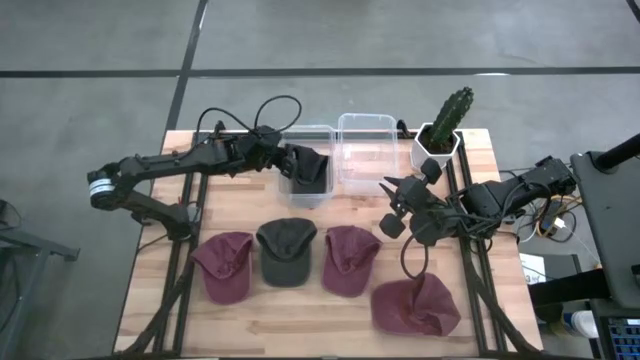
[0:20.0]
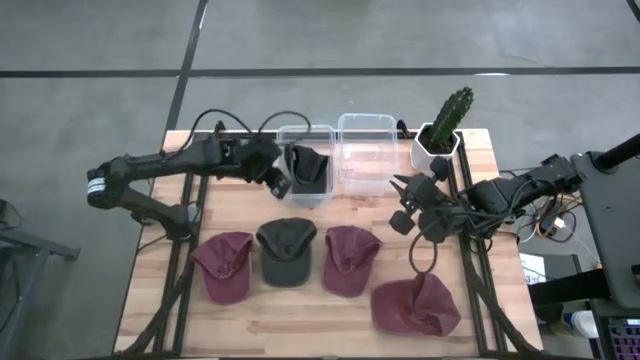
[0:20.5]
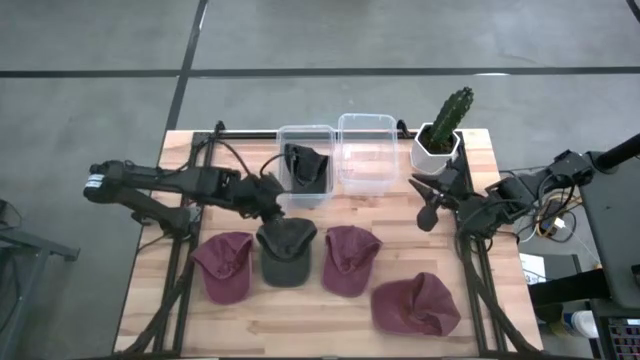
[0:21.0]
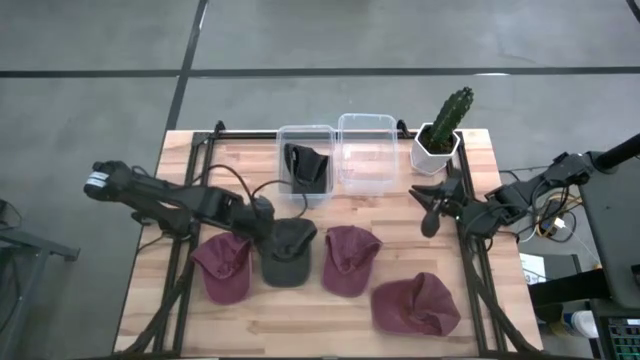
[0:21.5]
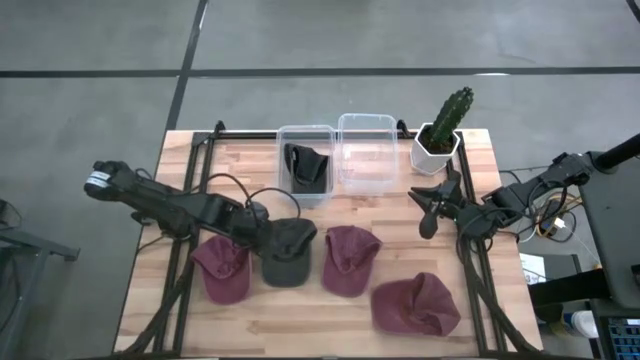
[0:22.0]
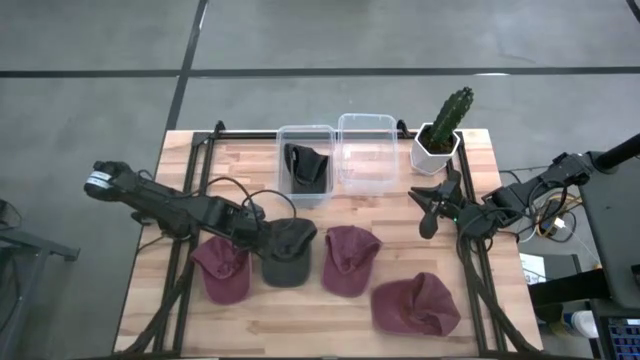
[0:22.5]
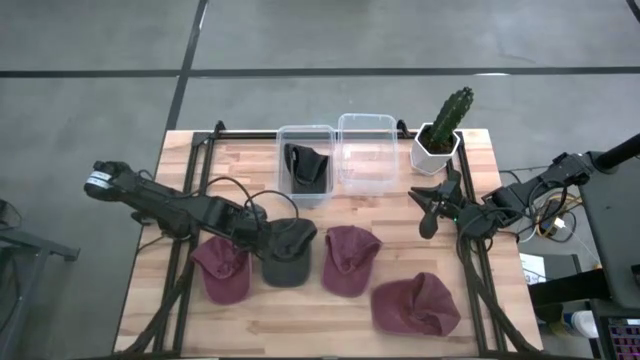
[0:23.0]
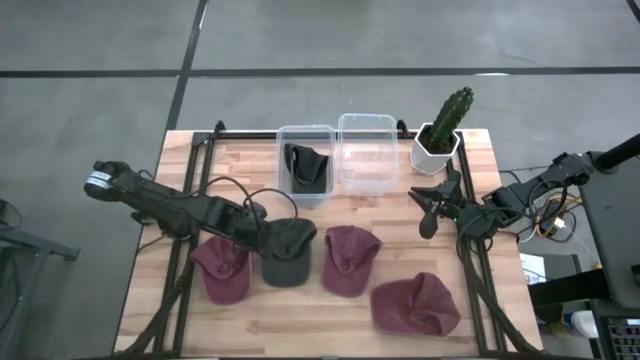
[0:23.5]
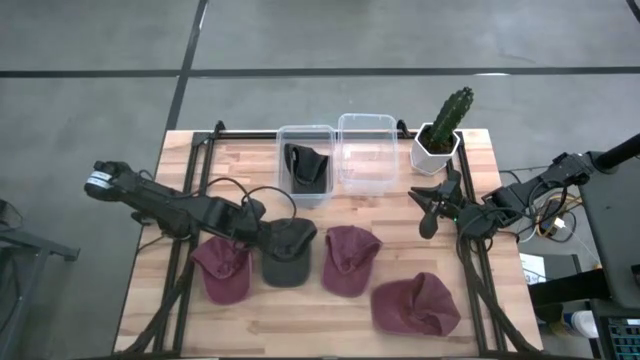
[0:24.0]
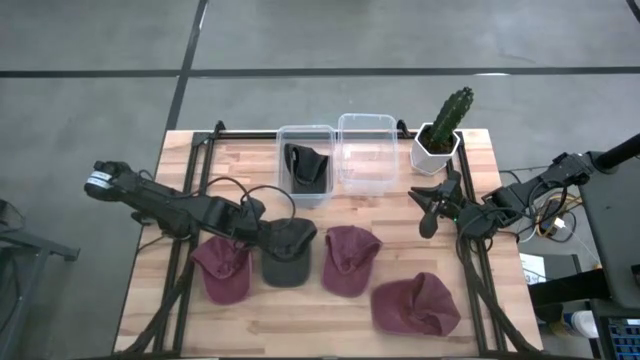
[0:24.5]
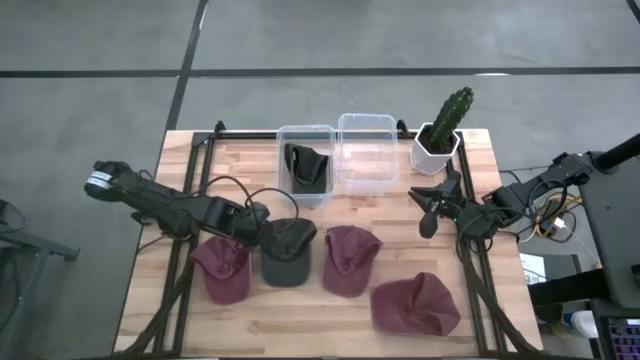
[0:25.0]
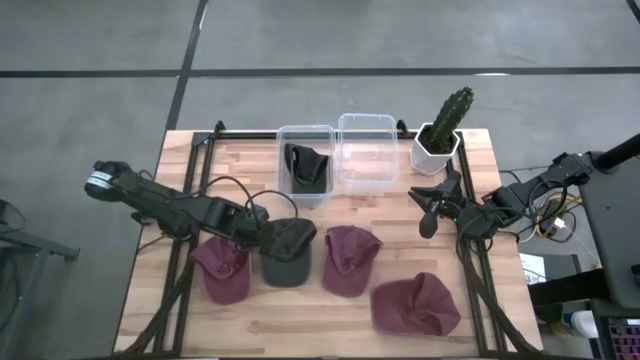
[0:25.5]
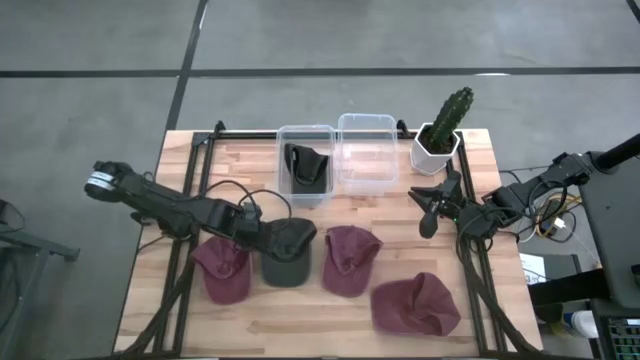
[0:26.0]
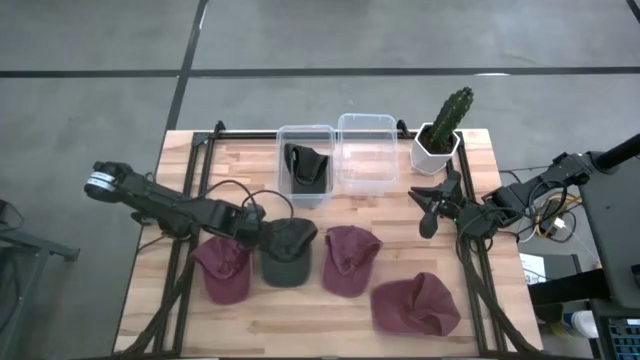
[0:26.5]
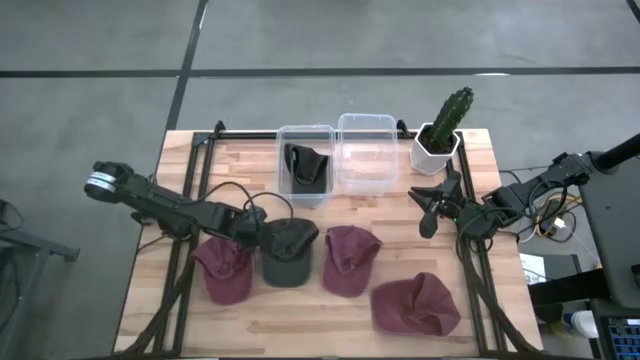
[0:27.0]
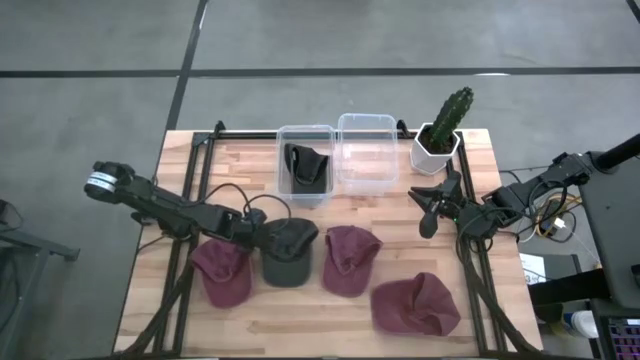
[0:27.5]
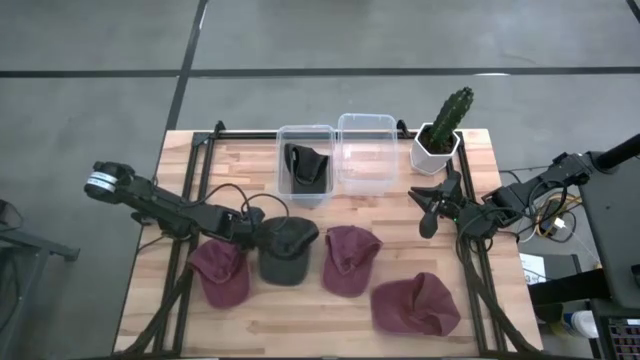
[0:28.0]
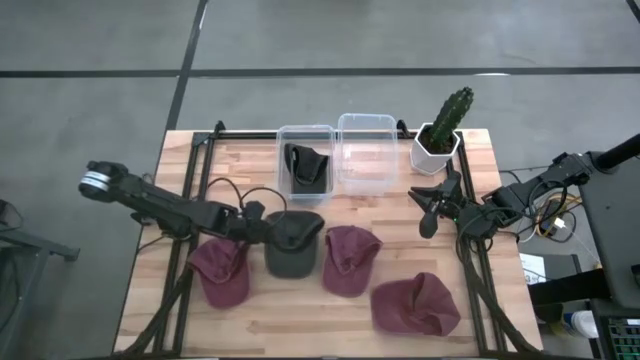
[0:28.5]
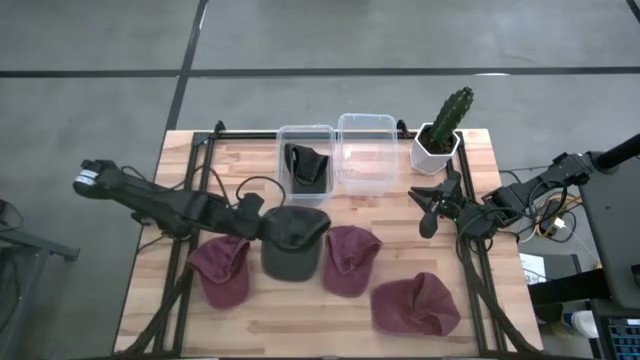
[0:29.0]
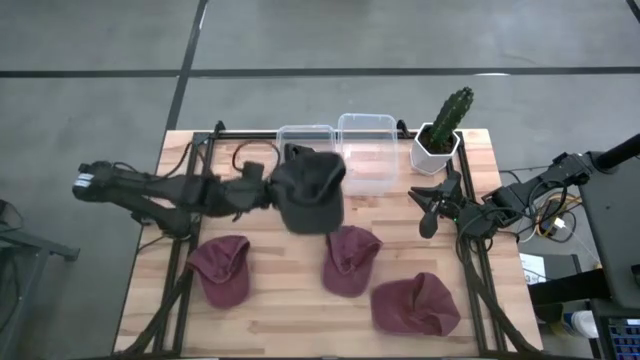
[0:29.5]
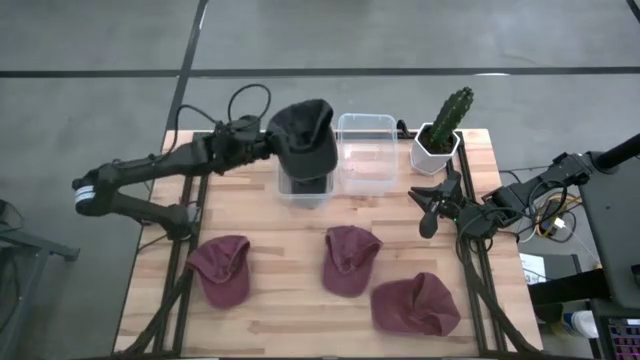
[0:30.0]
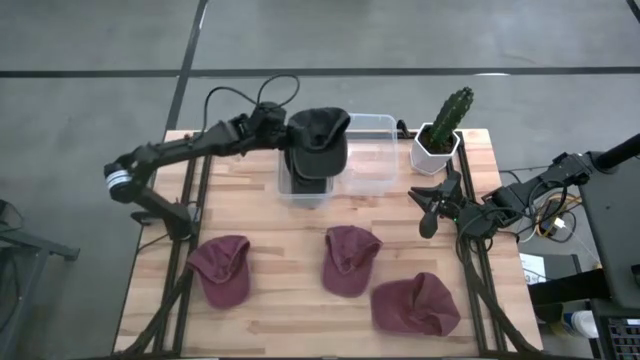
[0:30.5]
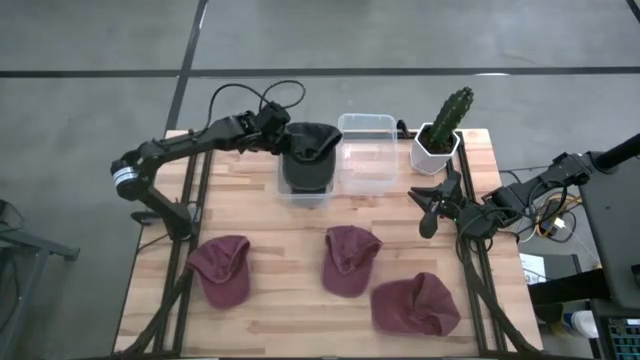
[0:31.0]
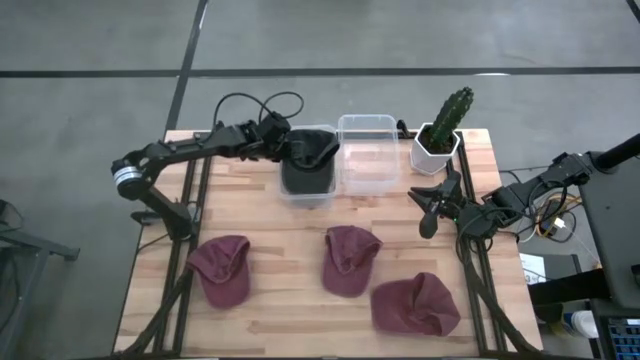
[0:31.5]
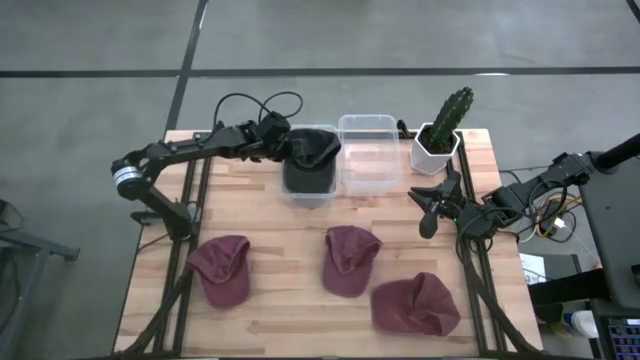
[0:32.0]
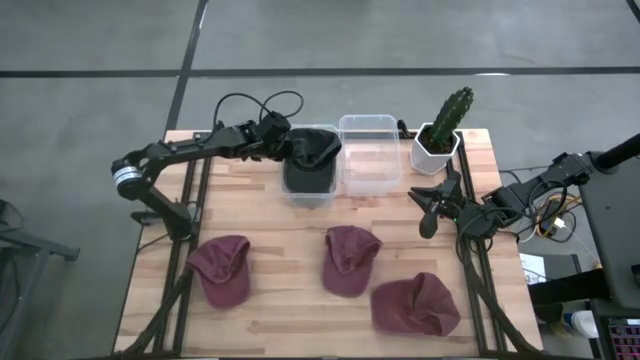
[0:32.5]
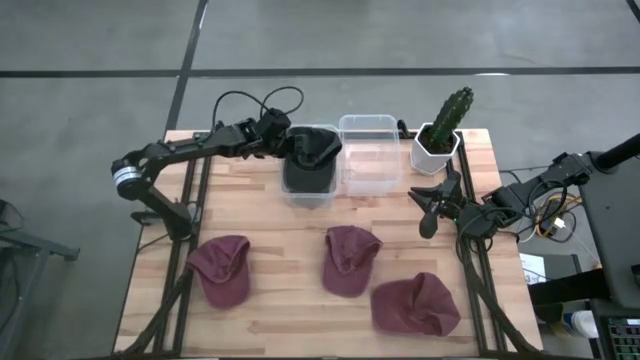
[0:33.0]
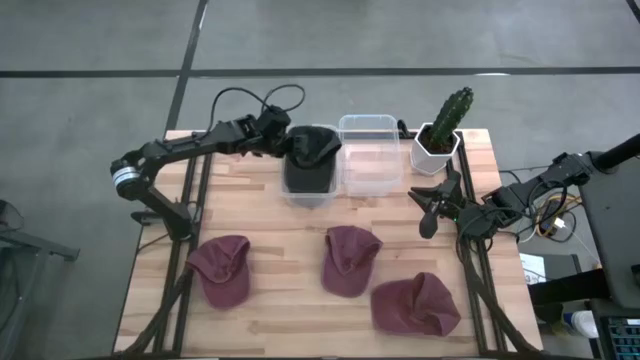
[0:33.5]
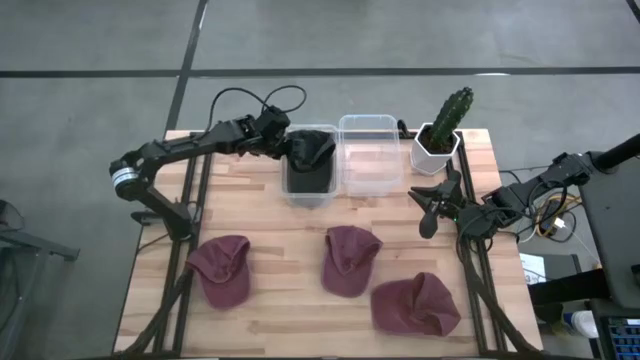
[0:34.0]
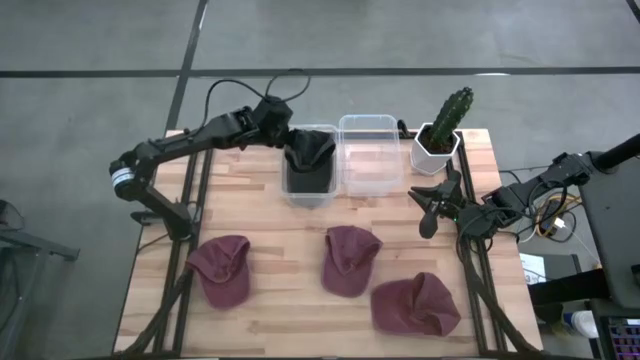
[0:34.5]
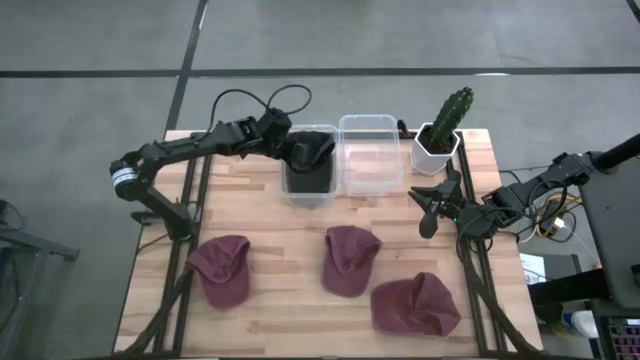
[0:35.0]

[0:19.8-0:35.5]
Task: Pick & Place hat
Put the black cap into the left transparent bin

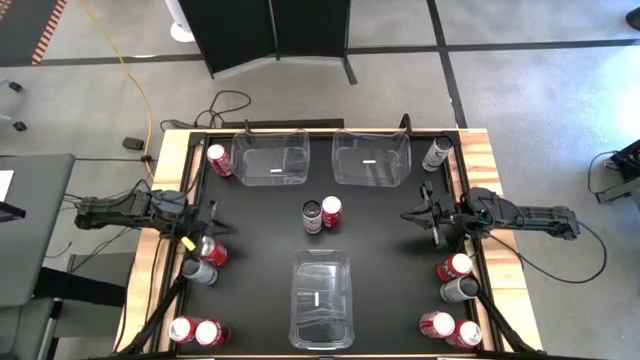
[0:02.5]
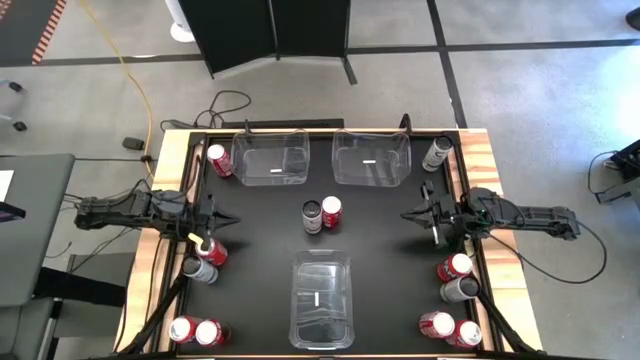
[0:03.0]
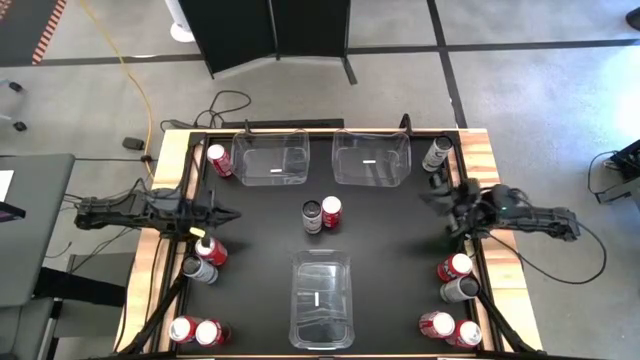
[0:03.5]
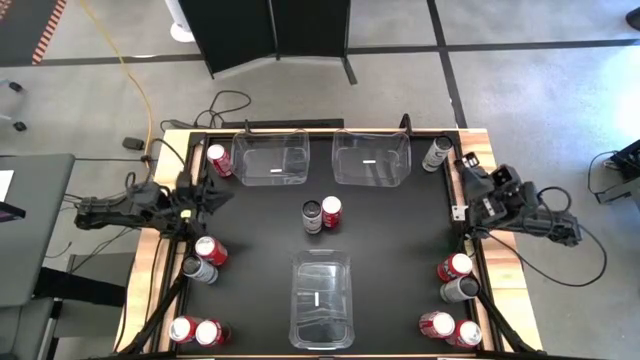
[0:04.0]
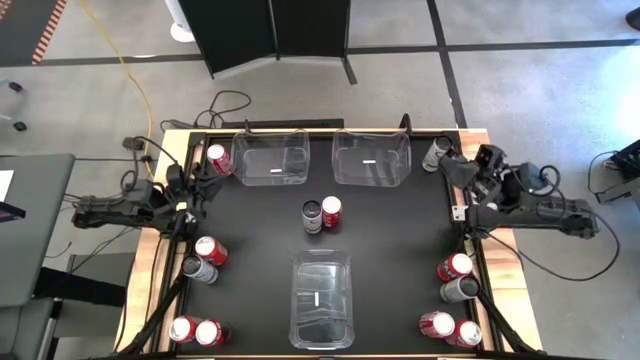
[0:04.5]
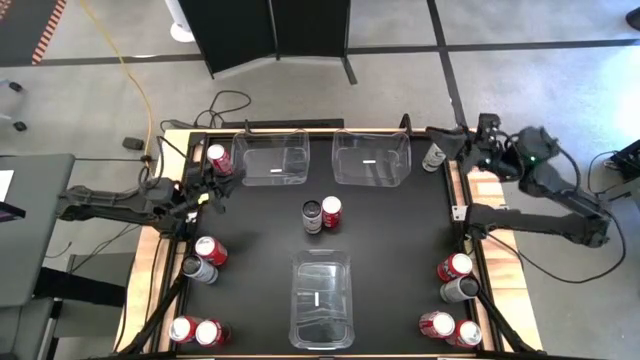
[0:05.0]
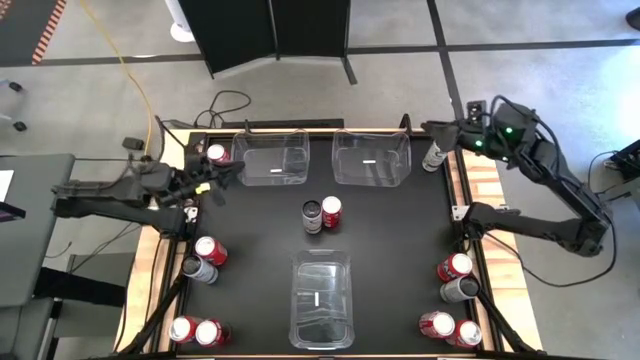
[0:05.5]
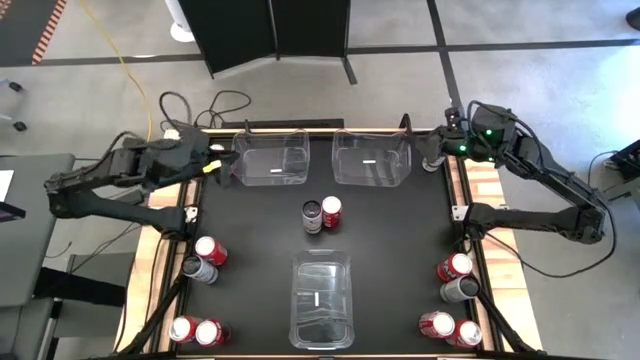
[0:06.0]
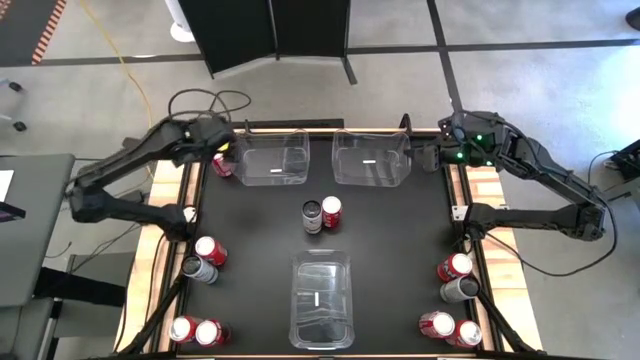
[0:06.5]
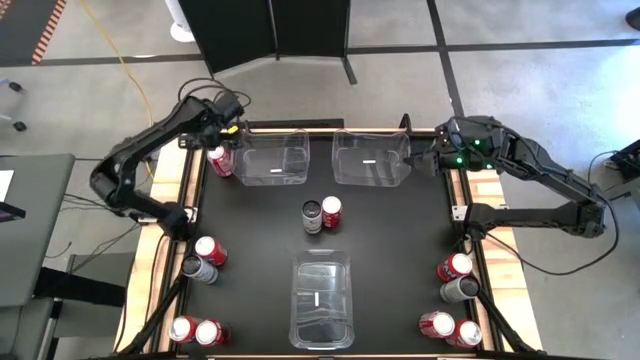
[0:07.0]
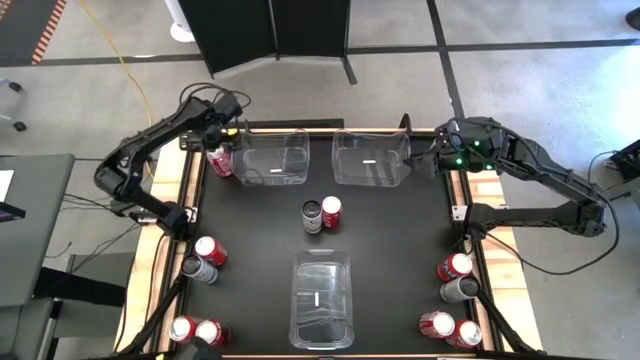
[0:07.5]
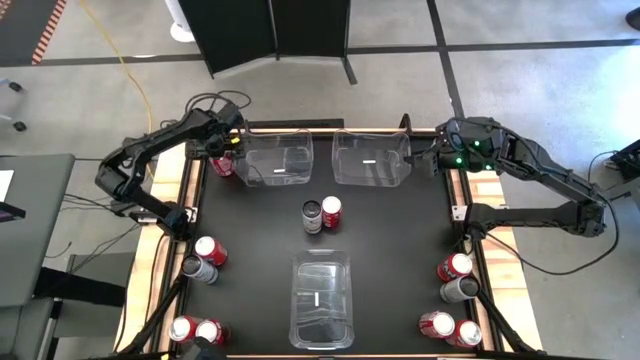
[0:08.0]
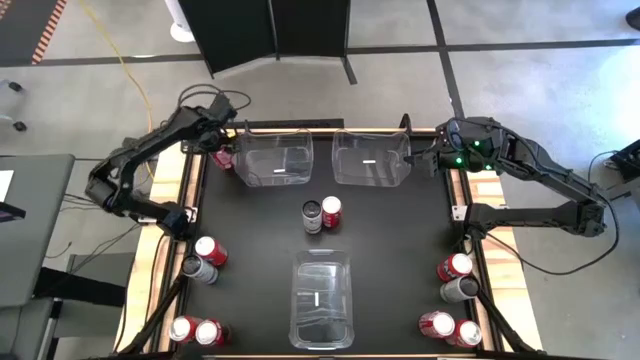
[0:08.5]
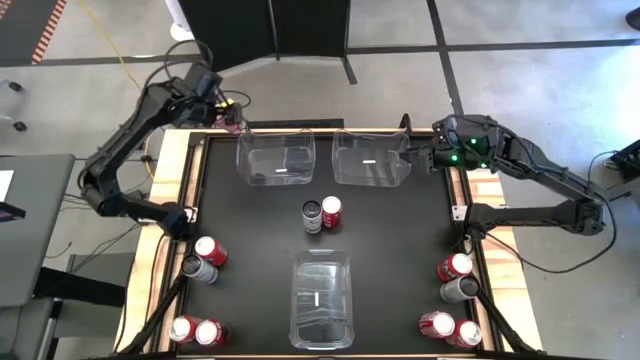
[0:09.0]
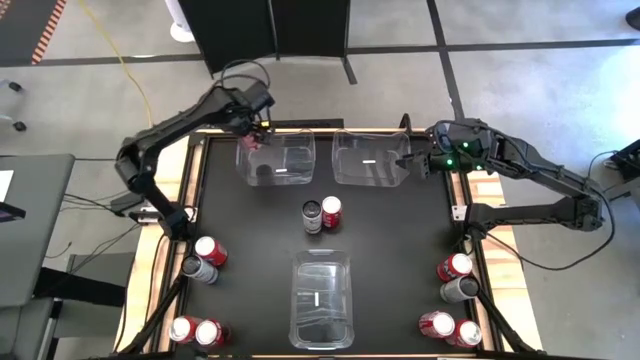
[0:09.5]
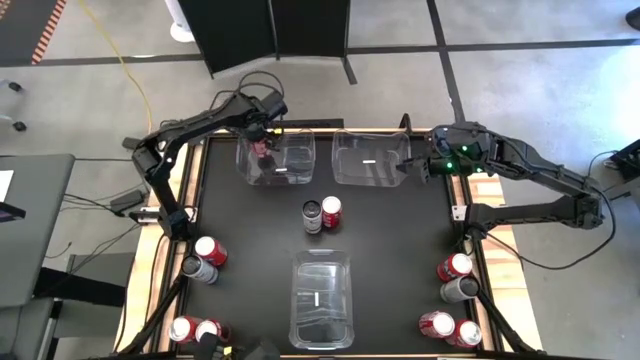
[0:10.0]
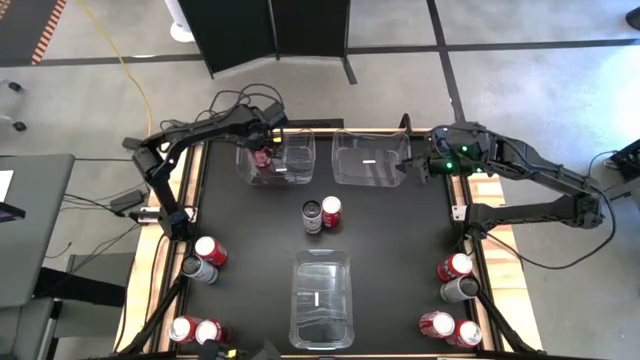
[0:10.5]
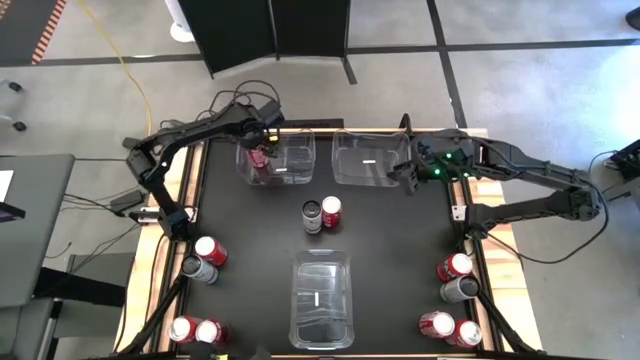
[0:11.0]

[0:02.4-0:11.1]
Task: Sort soda cans
Put the red white soda can into the left transparent bin
